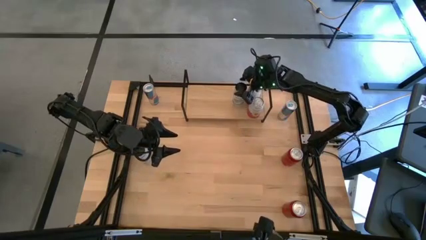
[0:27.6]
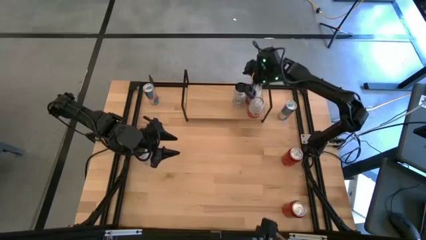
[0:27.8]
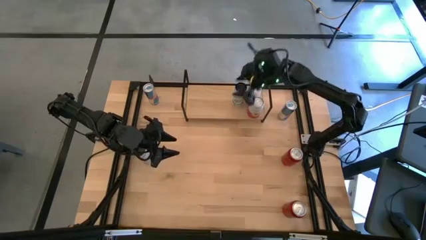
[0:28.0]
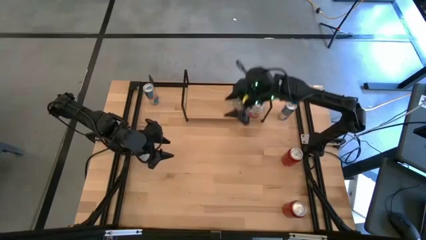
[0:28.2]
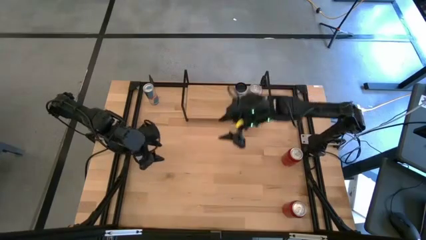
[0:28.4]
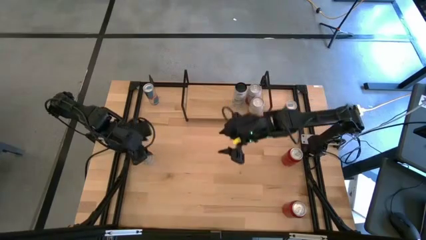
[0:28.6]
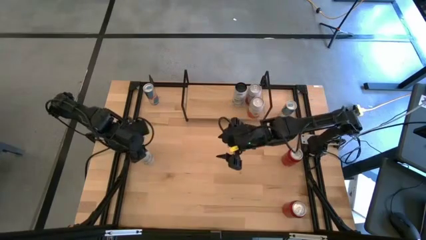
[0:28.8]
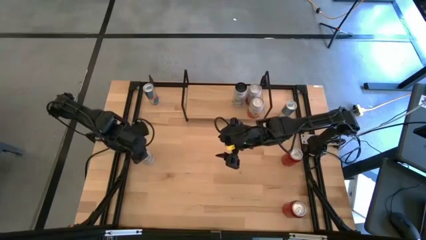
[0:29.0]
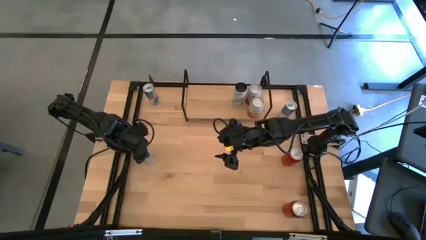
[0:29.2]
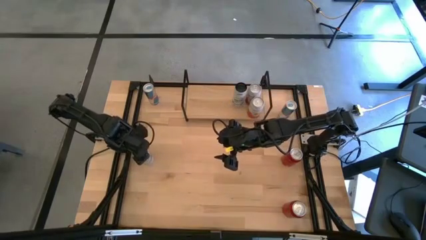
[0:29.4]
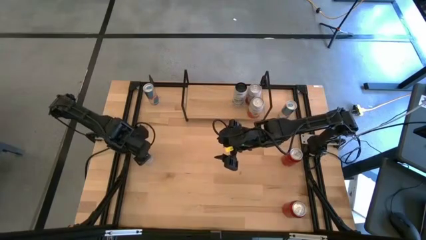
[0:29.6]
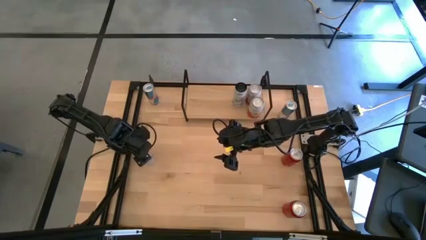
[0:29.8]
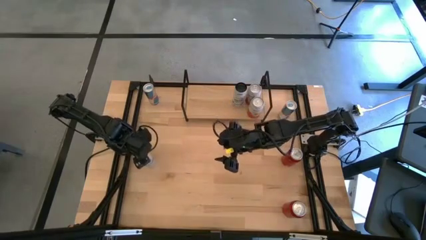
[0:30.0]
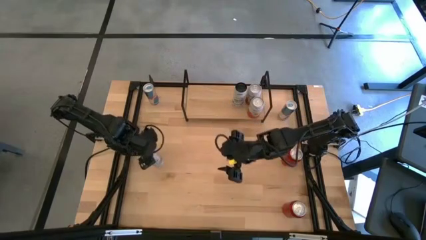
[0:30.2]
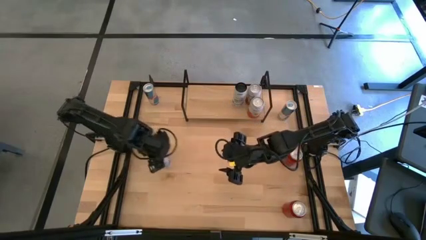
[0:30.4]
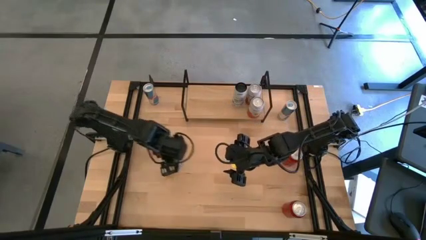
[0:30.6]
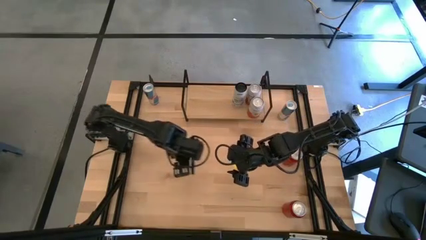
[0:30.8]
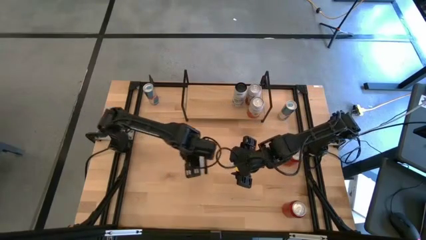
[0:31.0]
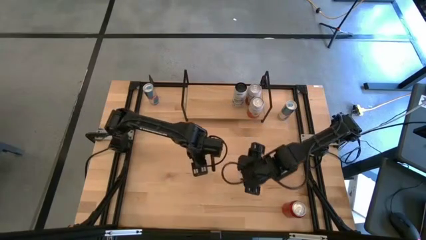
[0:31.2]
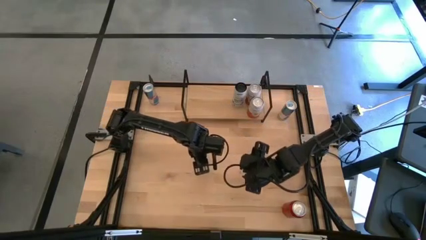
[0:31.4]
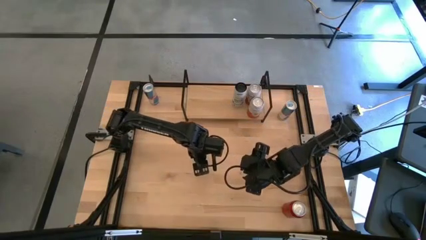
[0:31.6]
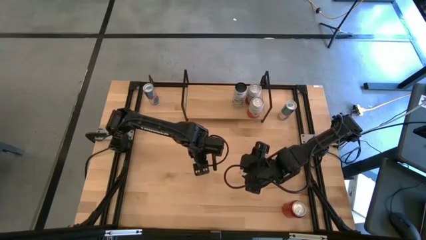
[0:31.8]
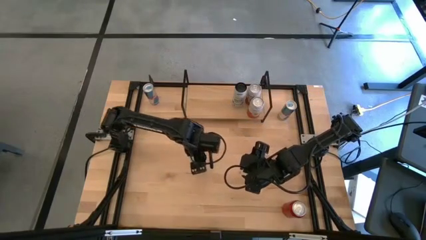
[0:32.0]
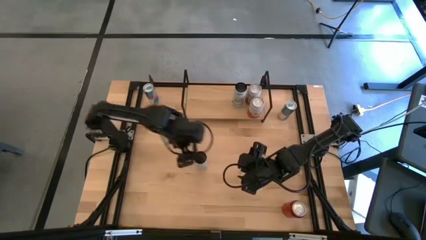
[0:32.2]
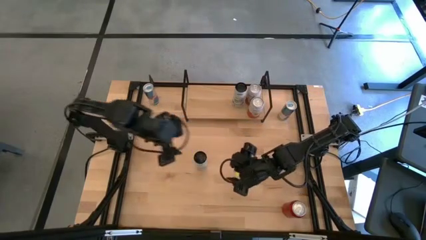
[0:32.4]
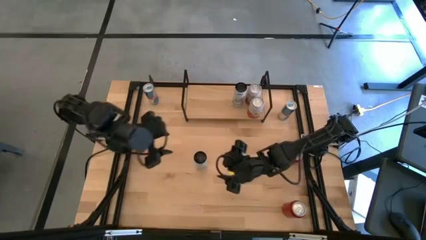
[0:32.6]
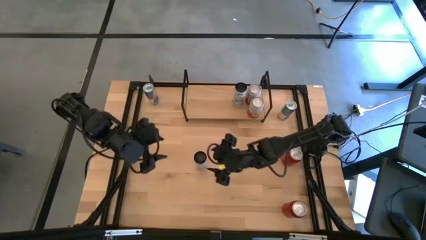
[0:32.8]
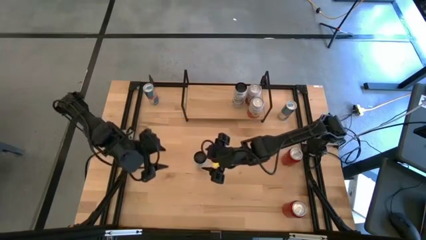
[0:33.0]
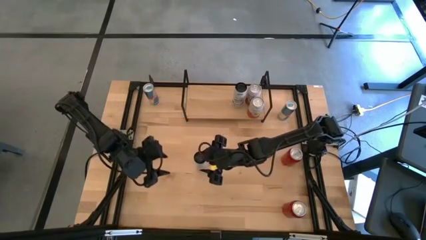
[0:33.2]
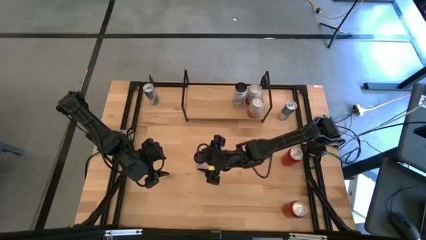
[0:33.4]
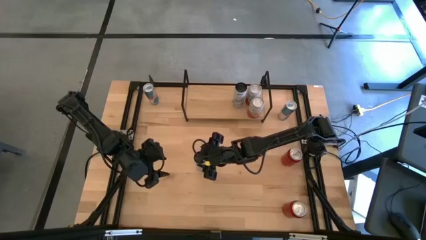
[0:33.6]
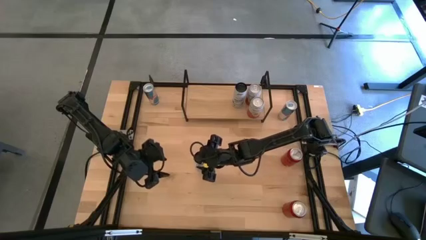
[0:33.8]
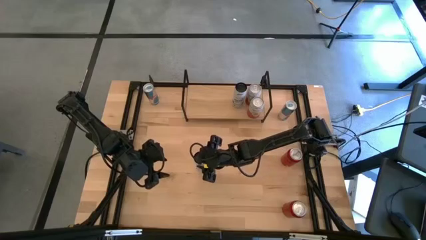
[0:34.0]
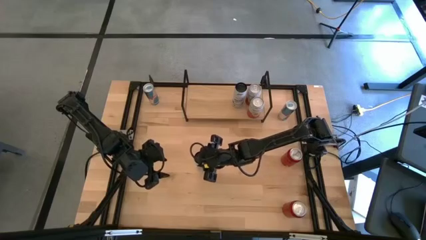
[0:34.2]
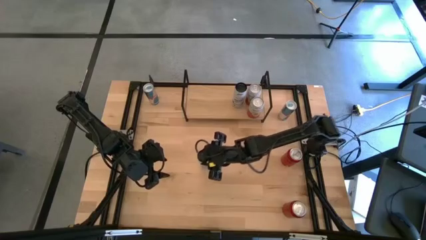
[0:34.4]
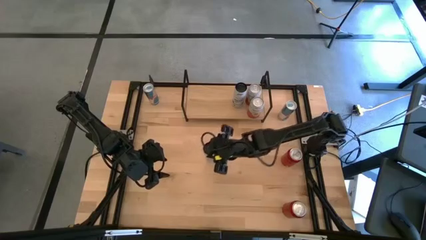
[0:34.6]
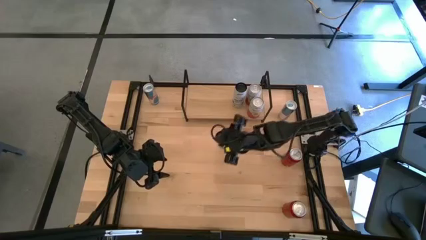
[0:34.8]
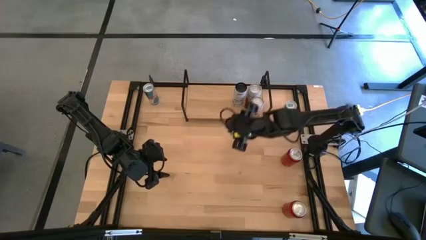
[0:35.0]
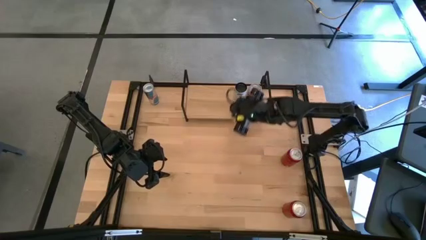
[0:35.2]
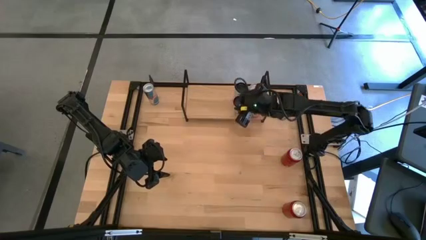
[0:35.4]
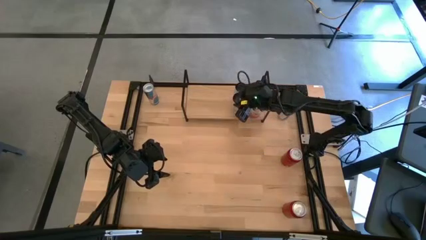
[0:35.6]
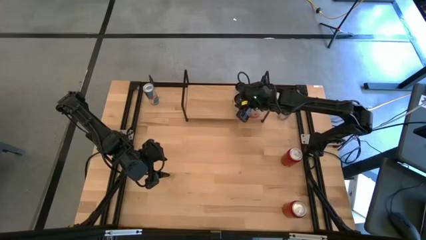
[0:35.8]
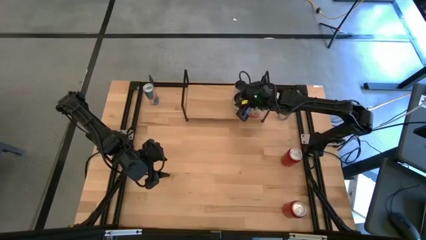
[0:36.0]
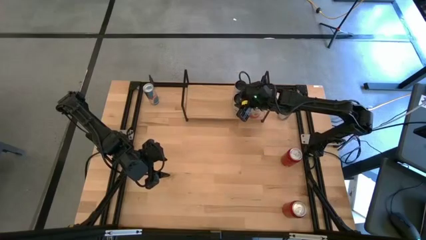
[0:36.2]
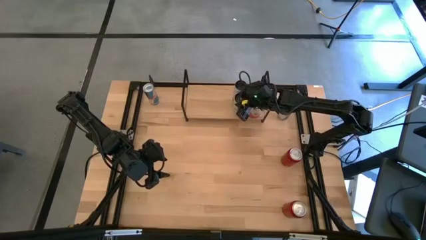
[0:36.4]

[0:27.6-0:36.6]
Task: Place canned beverage on shelf
Put the white soda can on the shelf

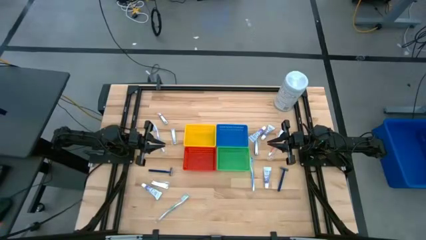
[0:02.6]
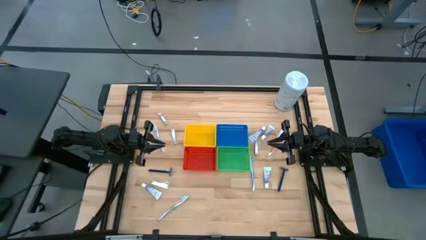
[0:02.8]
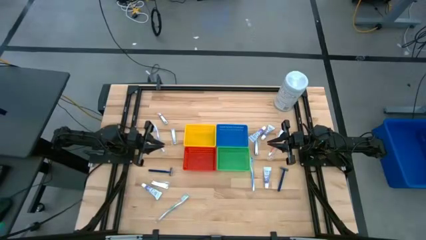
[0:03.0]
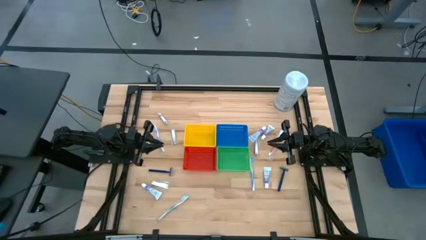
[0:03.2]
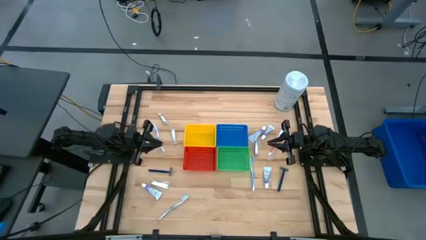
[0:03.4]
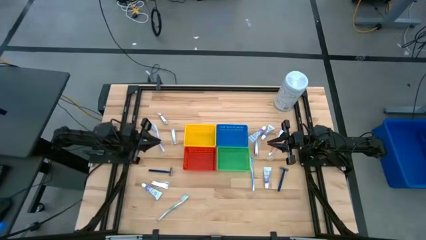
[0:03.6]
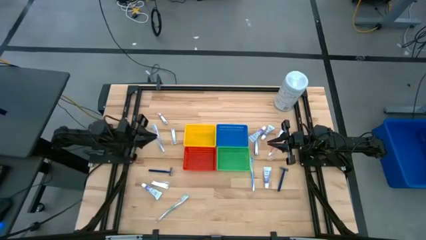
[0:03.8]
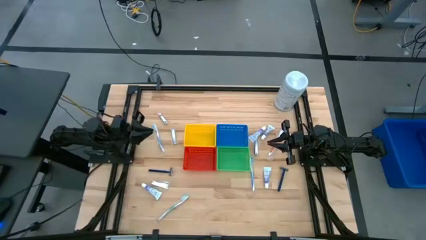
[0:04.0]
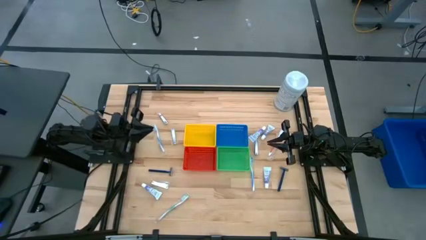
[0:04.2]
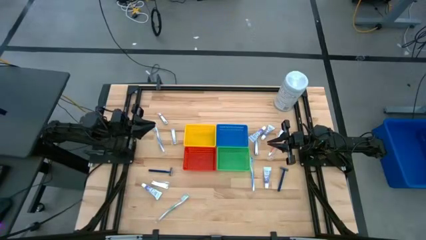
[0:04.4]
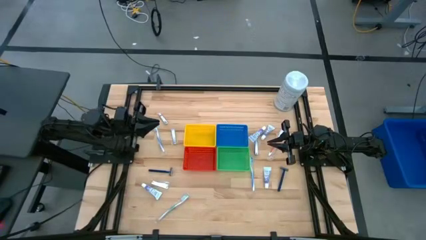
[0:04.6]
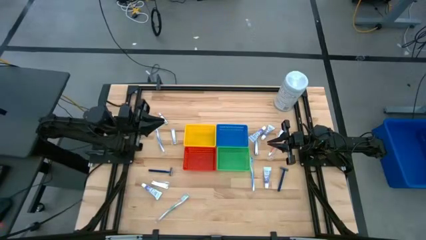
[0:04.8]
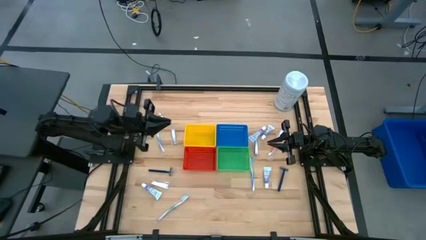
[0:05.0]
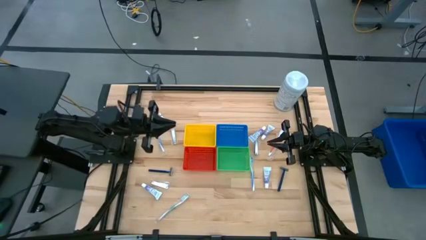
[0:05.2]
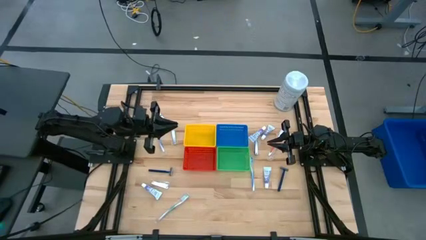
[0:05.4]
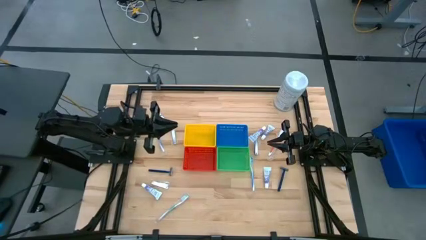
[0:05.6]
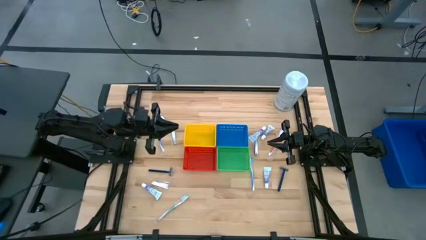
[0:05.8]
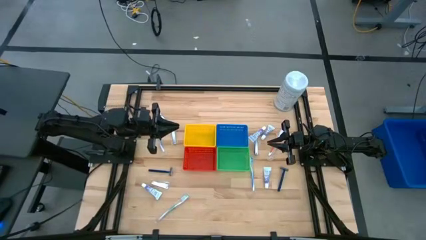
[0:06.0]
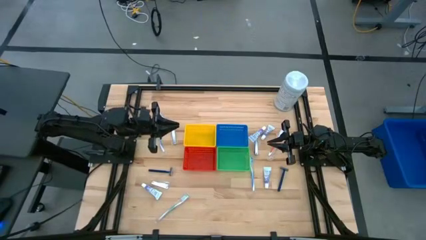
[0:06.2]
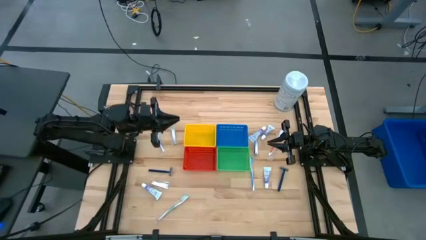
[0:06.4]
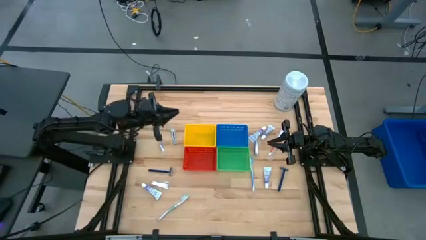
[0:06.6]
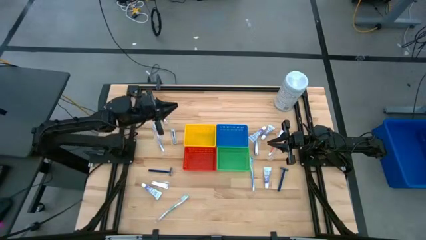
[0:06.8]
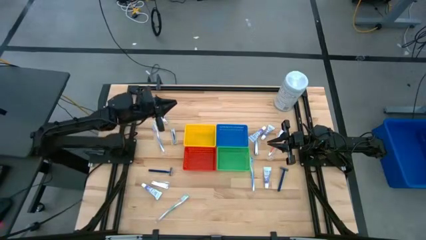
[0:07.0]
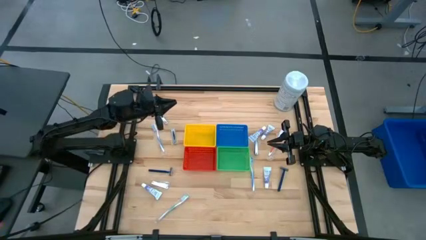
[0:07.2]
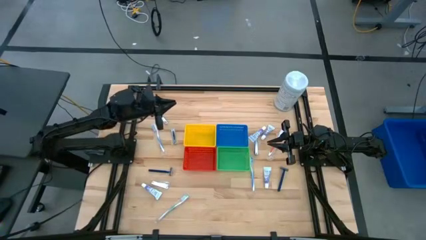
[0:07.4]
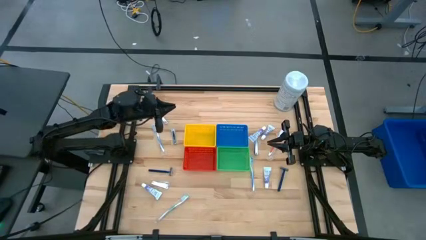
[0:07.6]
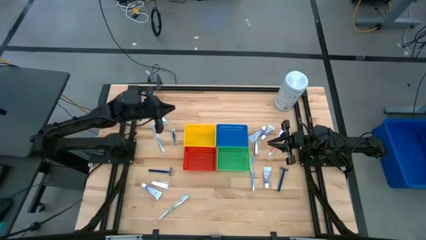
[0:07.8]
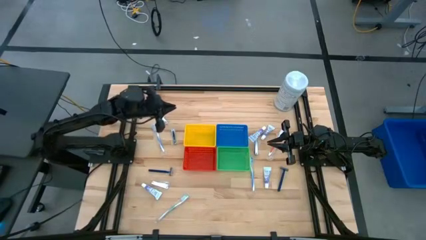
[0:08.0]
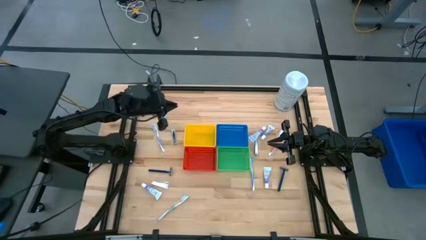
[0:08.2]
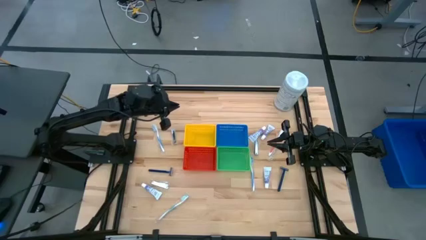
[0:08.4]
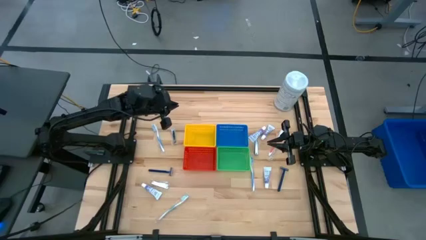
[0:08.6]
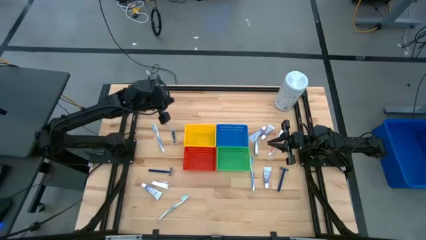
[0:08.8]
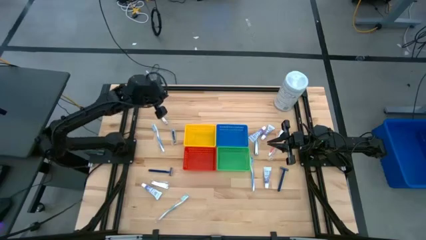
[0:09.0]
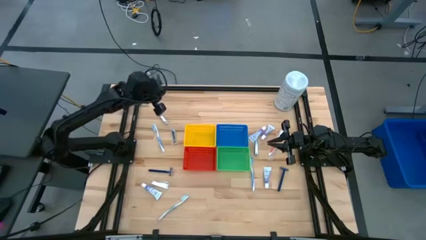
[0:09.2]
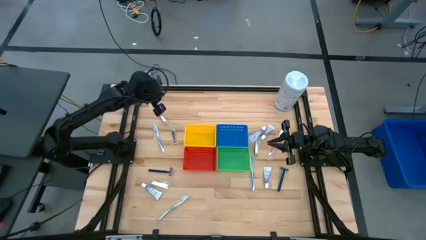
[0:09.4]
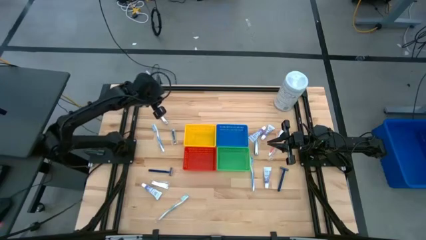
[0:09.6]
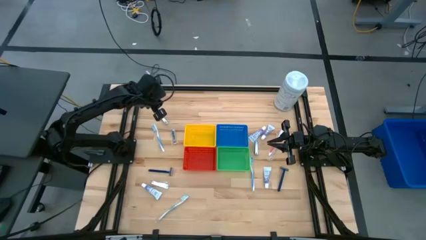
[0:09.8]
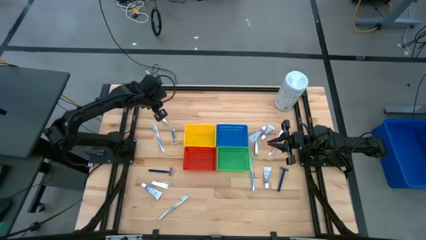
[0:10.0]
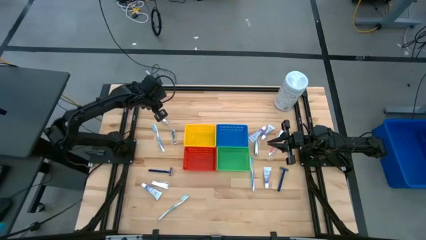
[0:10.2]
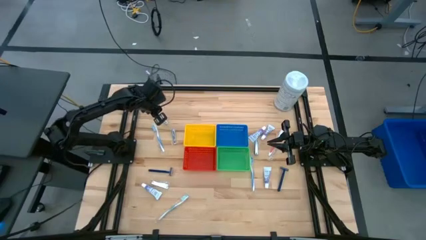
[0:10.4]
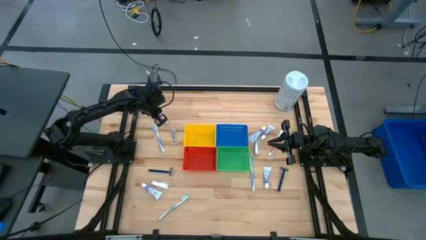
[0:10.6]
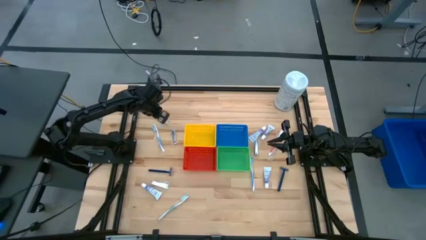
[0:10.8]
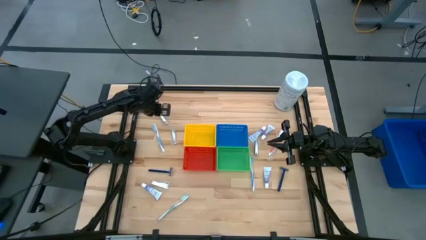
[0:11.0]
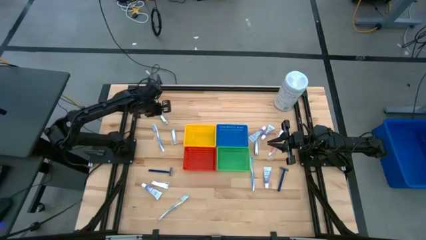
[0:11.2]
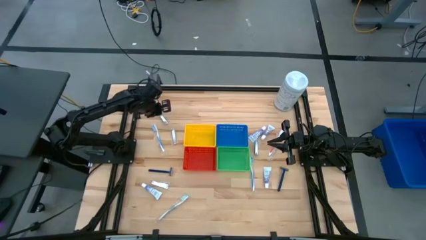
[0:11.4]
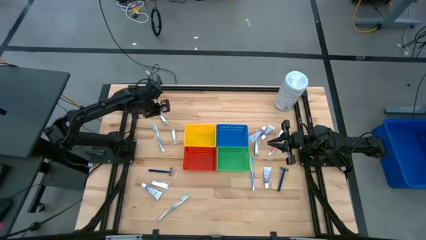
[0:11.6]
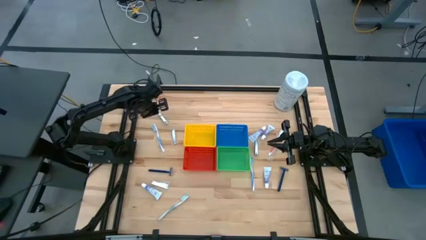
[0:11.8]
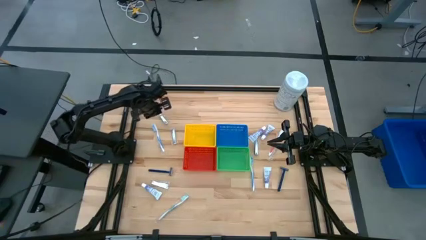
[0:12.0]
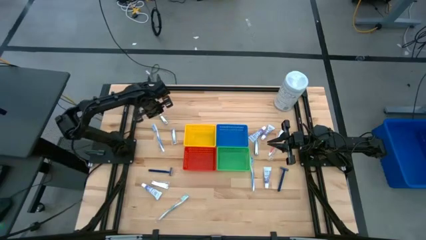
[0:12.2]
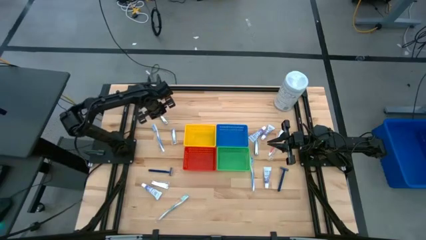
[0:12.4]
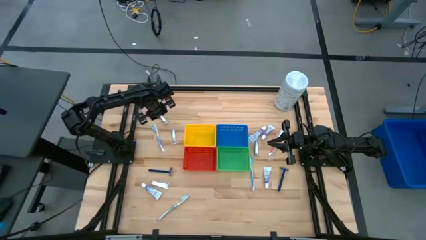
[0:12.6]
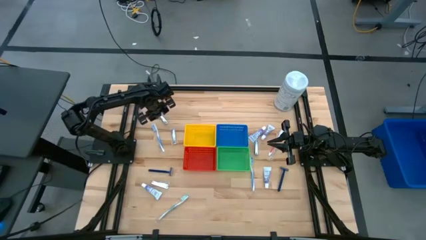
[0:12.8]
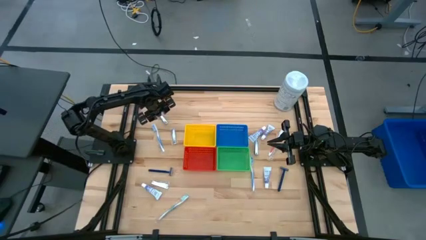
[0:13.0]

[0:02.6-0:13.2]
Task: Pick & Place Travel size toiletries
Put the top left nail cutter into the yellow bin
